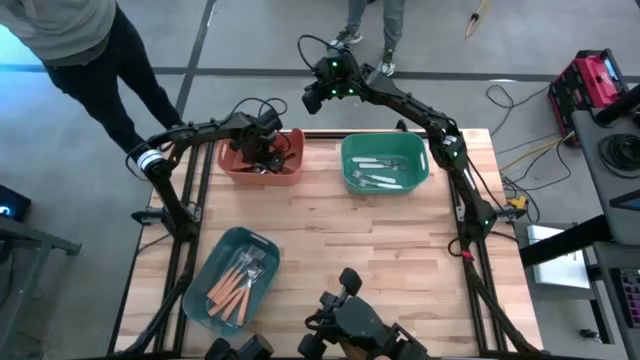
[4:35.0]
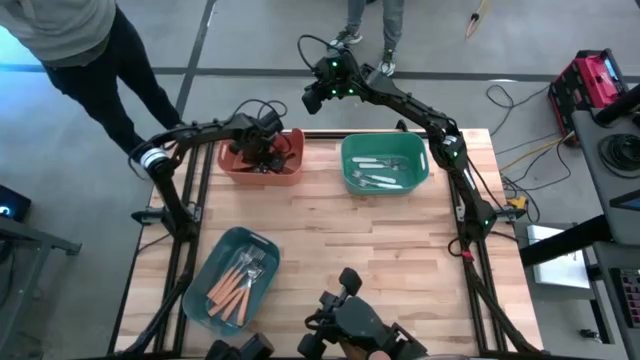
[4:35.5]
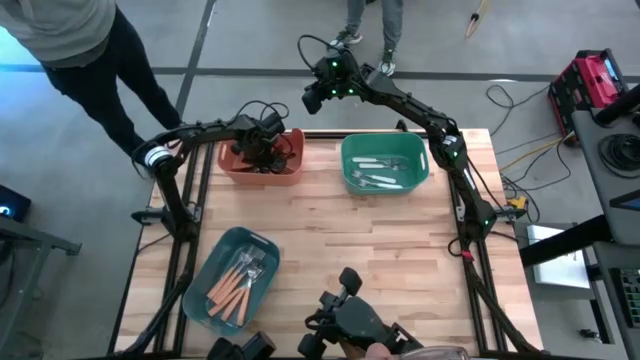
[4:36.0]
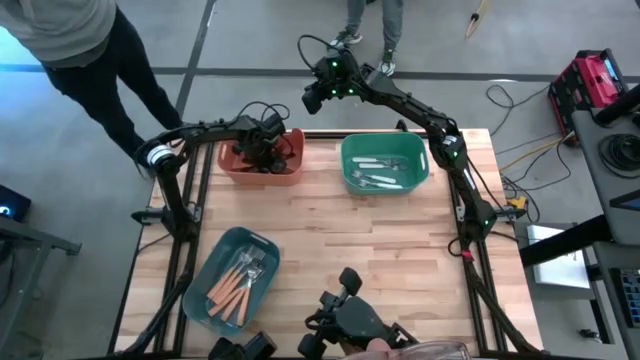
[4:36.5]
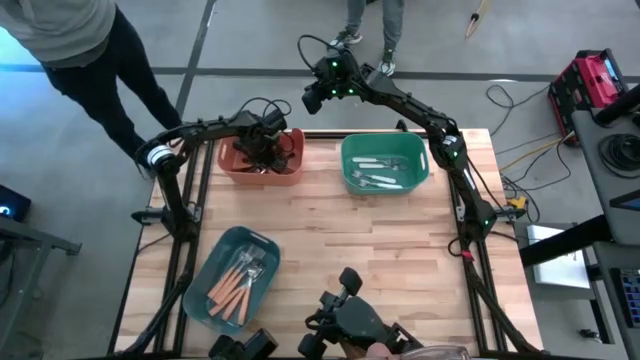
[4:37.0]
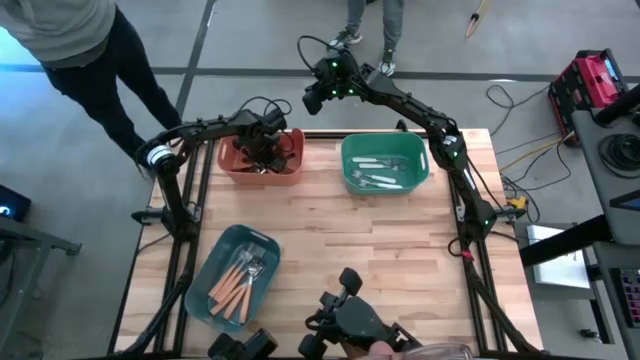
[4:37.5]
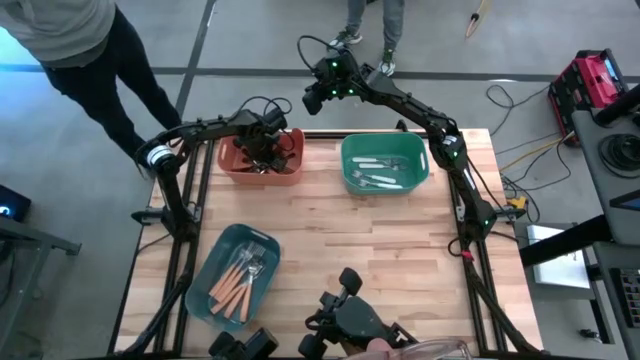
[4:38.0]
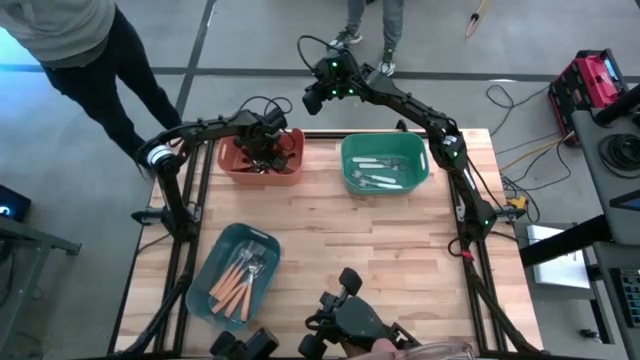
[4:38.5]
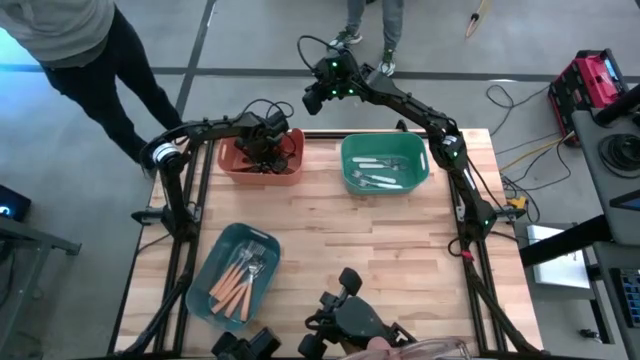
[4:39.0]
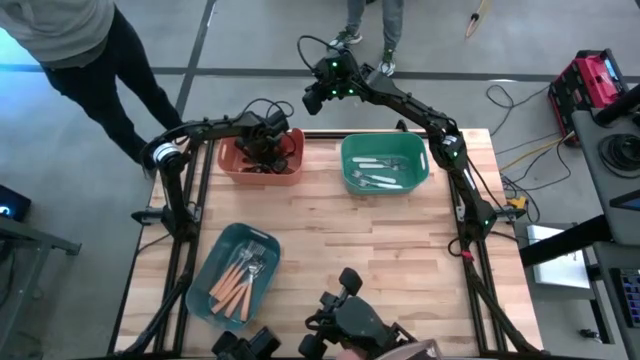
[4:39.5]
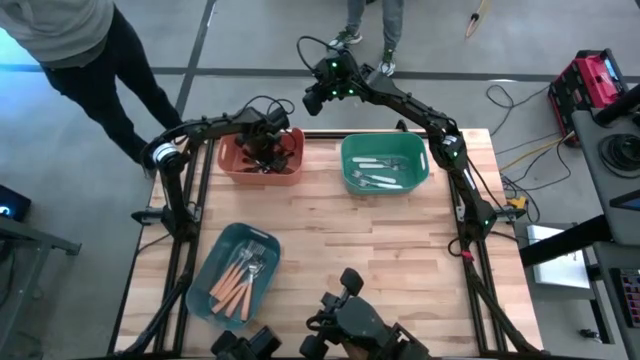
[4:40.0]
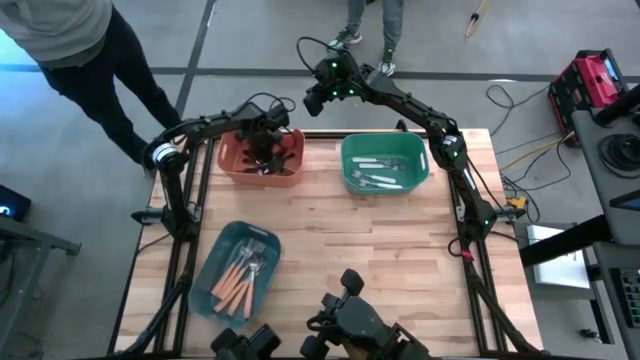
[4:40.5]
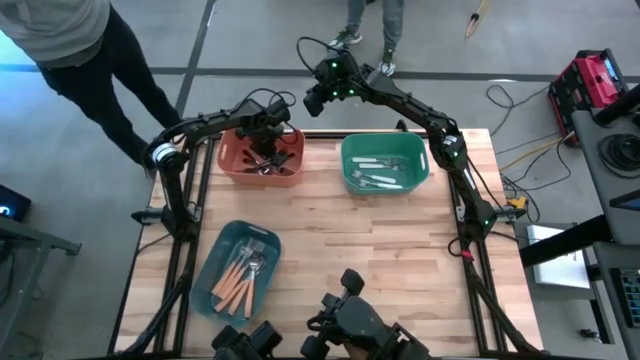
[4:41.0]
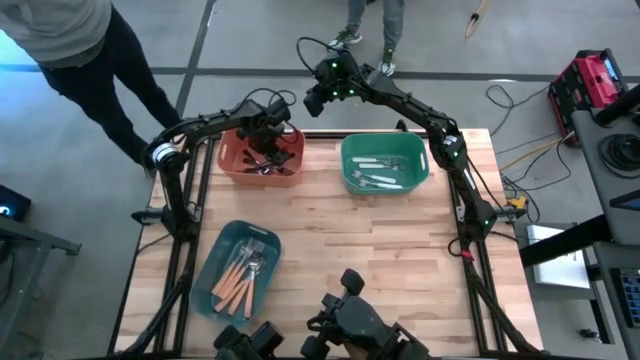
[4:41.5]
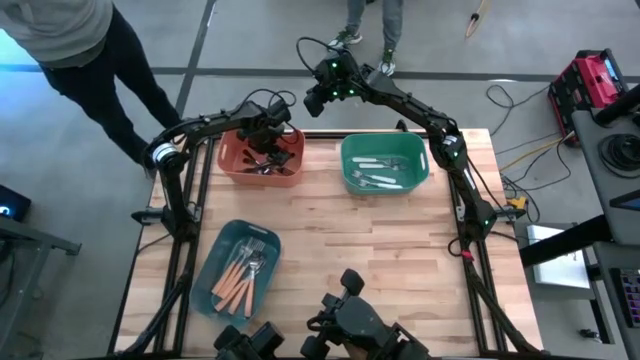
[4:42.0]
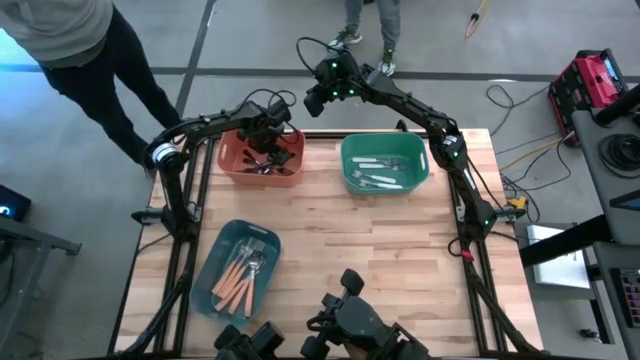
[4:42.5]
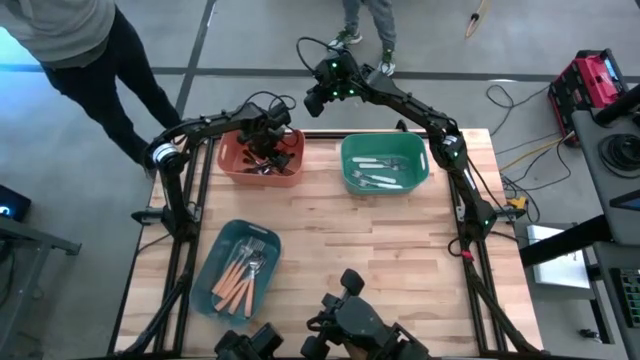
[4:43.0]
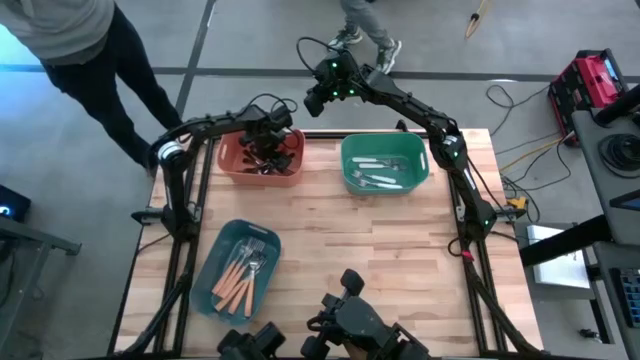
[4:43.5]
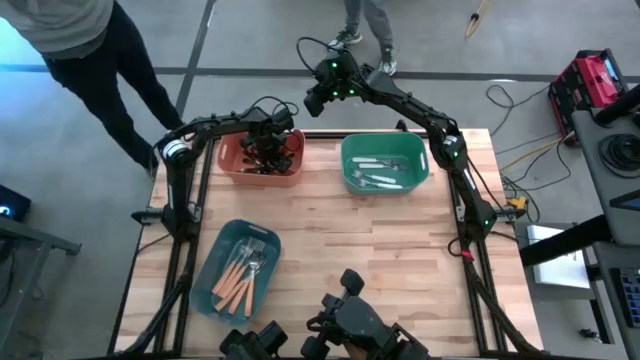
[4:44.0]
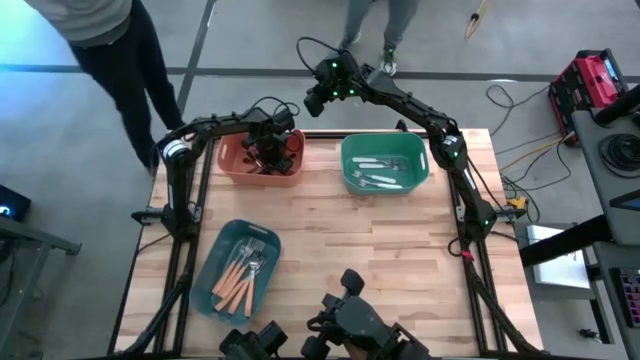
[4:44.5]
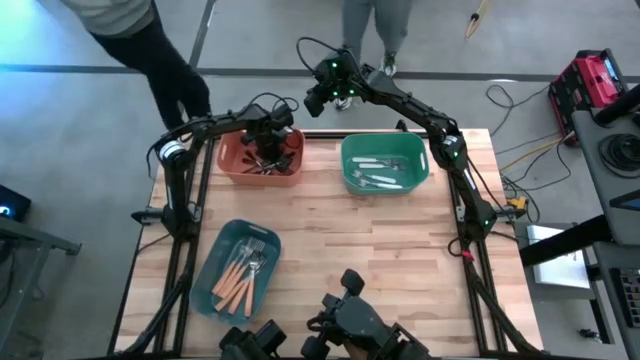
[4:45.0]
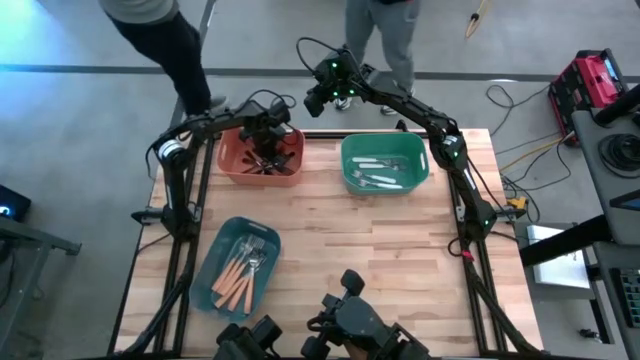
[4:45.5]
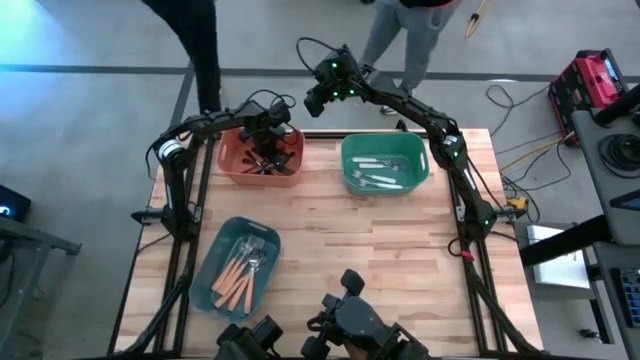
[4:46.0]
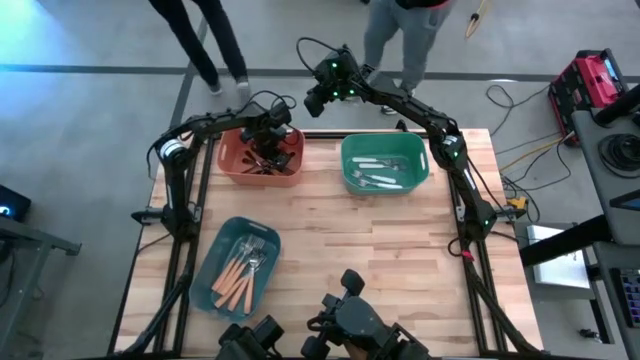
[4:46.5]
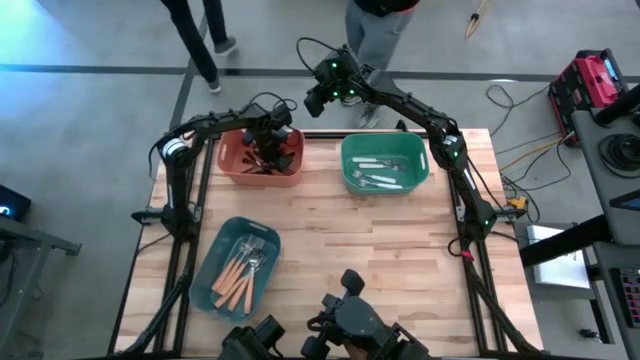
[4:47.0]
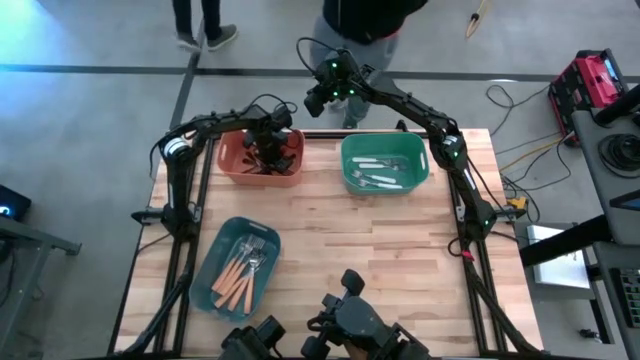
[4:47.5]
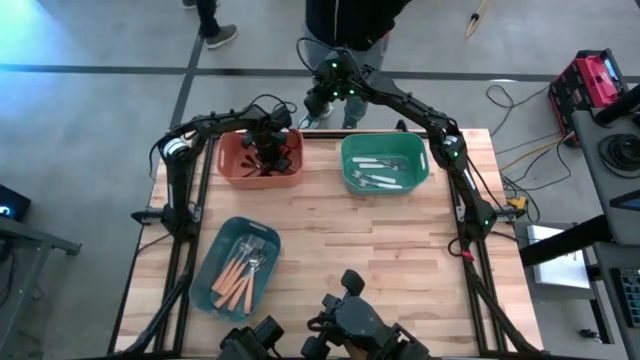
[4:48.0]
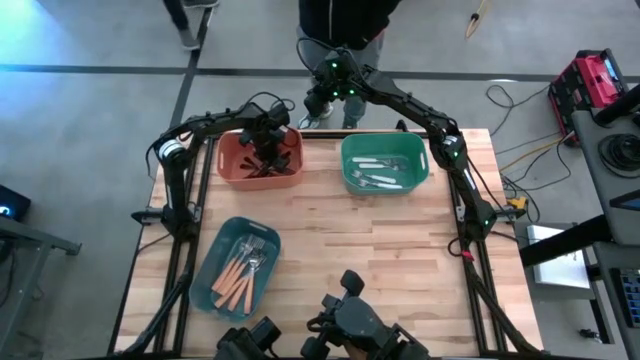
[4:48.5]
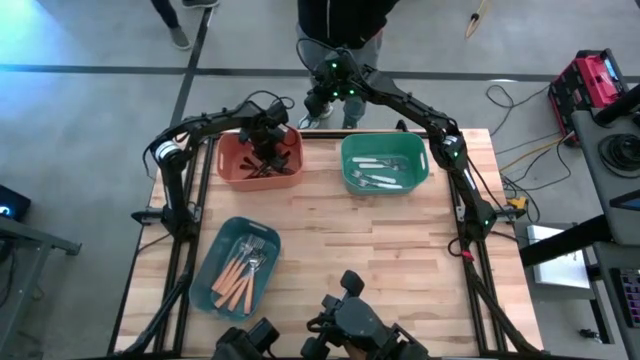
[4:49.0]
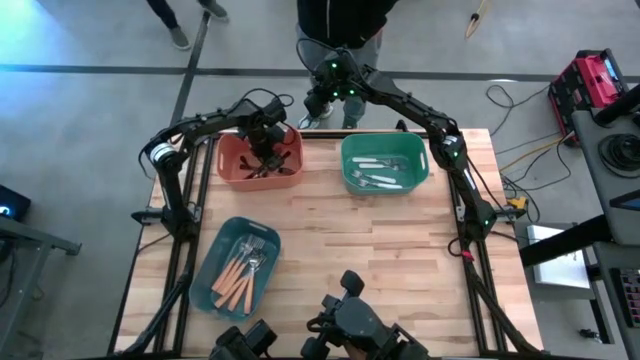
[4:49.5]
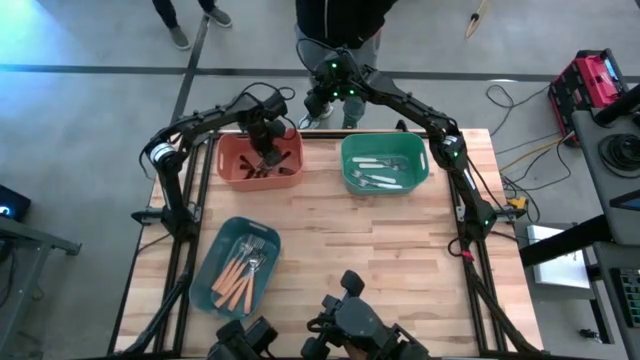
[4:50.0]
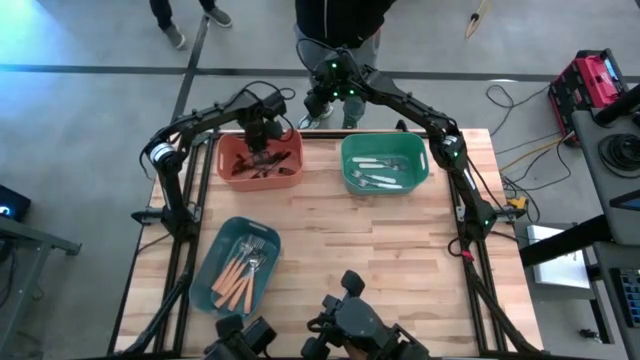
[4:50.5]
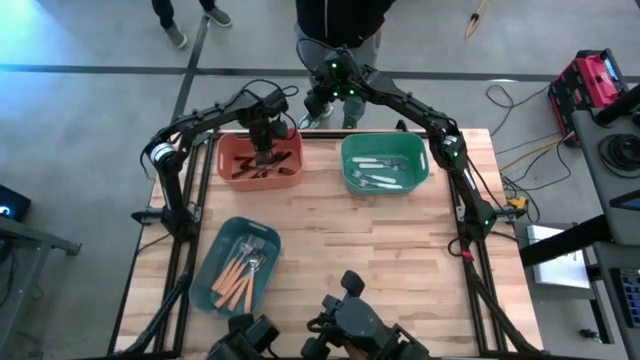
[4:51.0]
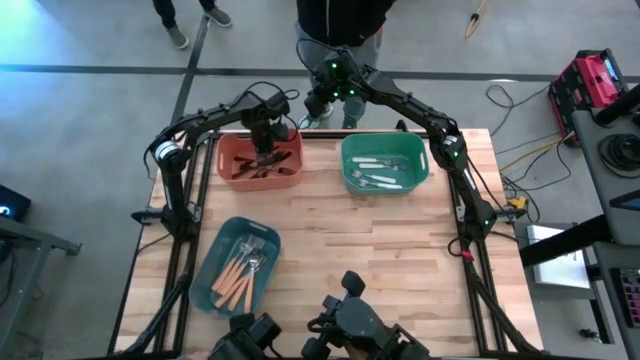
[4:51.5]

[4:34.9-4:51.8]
Task: Sort silverware by color (type)
Adjust the black forks in the orange bin
